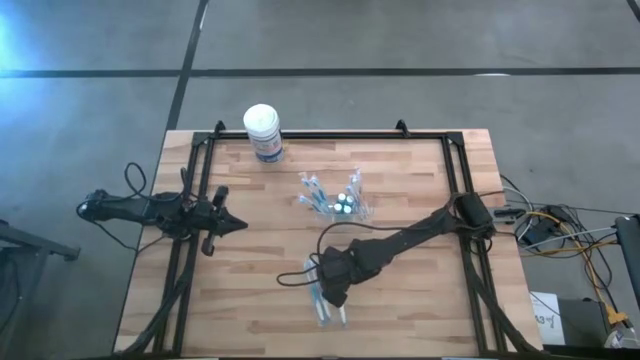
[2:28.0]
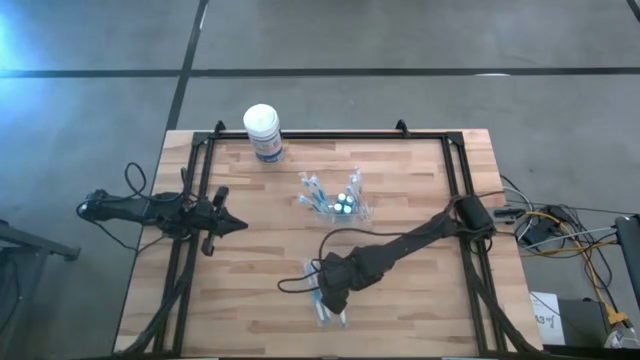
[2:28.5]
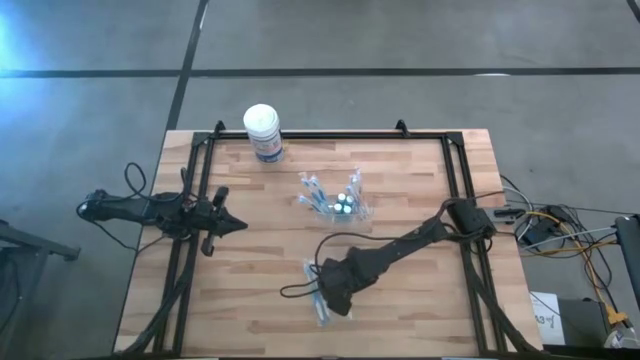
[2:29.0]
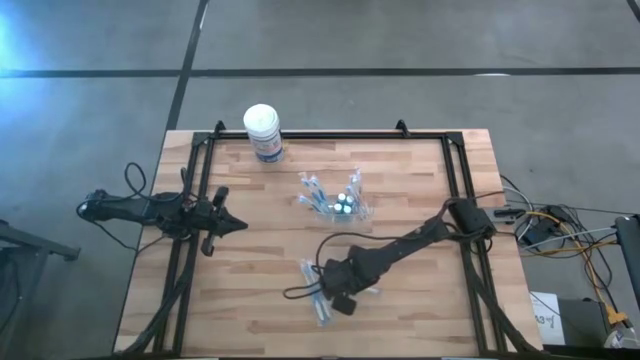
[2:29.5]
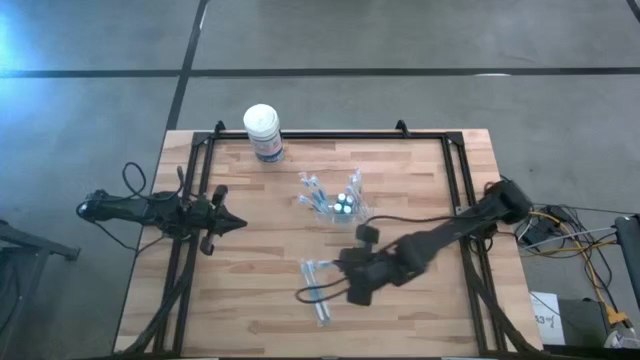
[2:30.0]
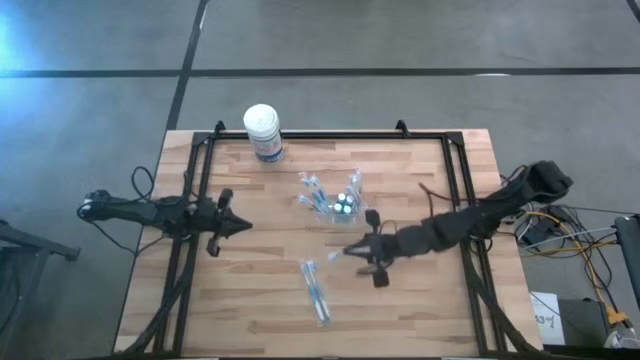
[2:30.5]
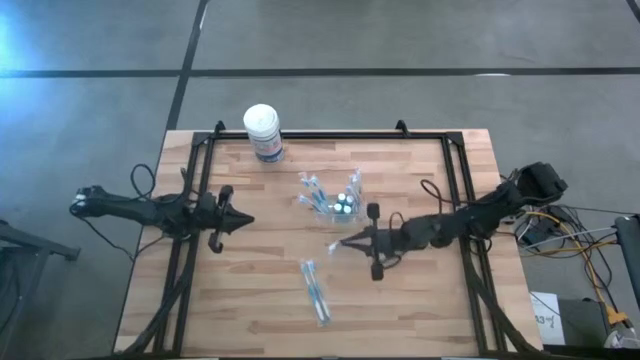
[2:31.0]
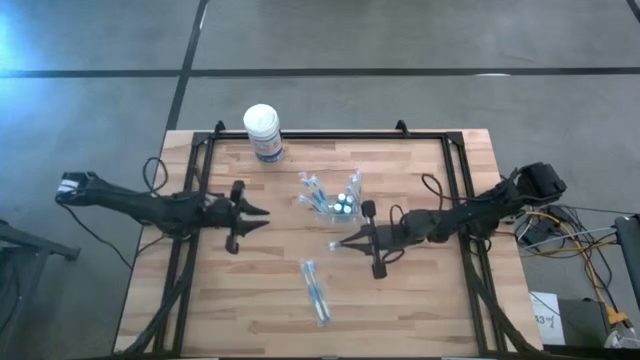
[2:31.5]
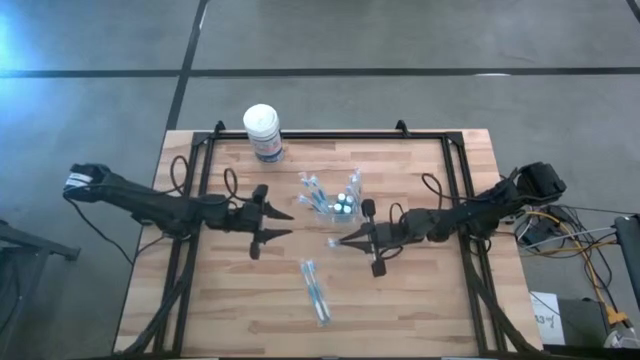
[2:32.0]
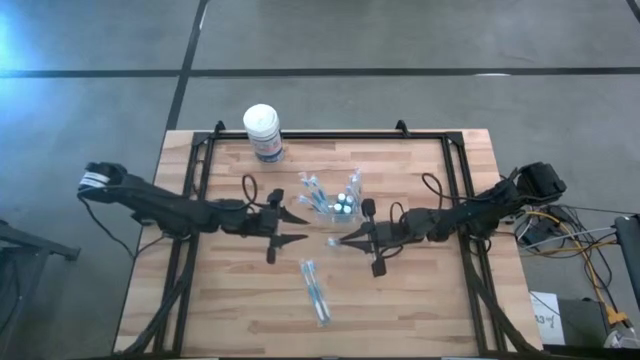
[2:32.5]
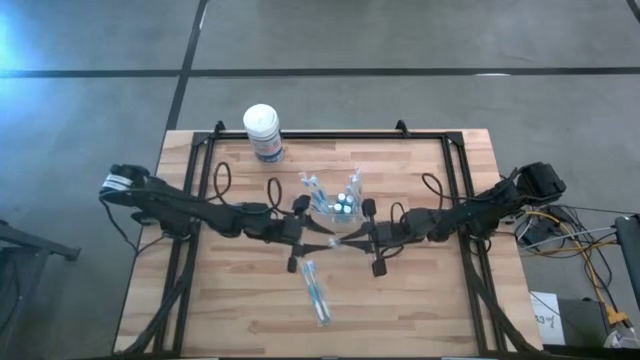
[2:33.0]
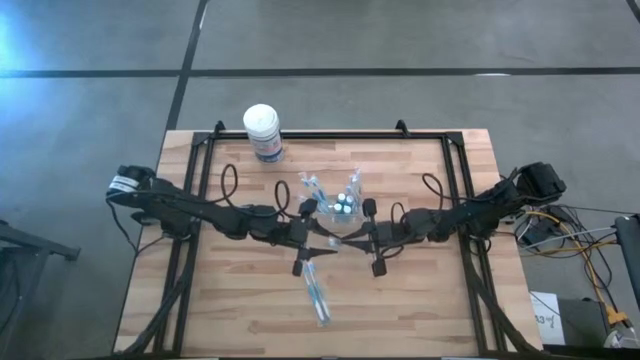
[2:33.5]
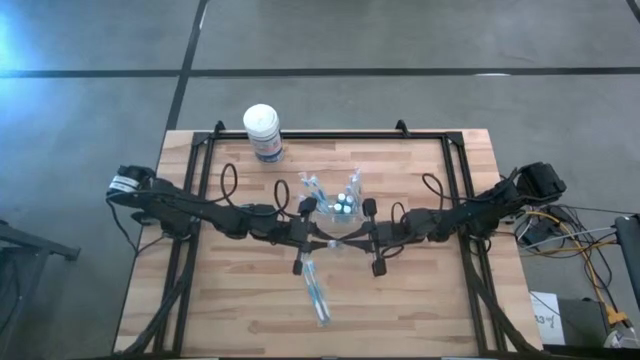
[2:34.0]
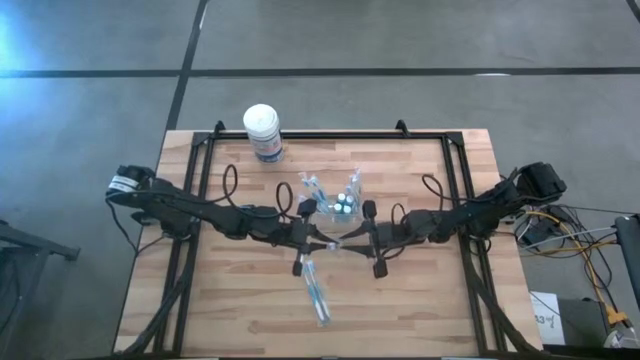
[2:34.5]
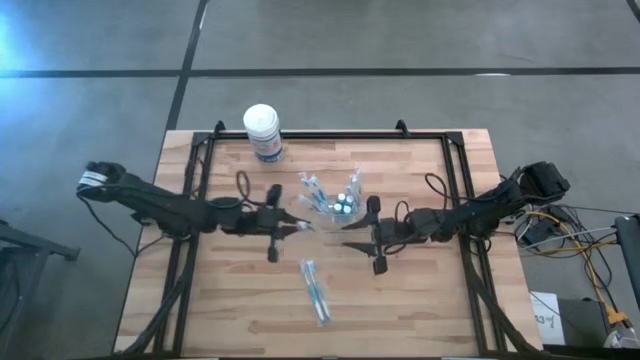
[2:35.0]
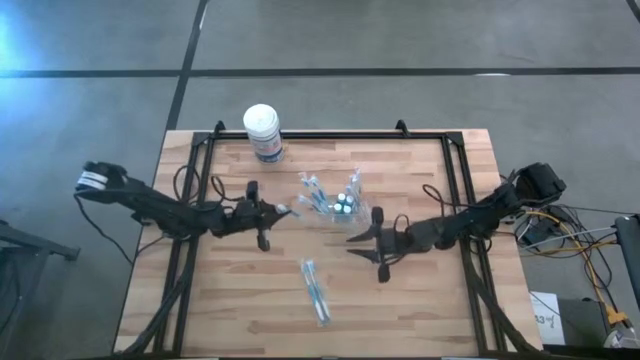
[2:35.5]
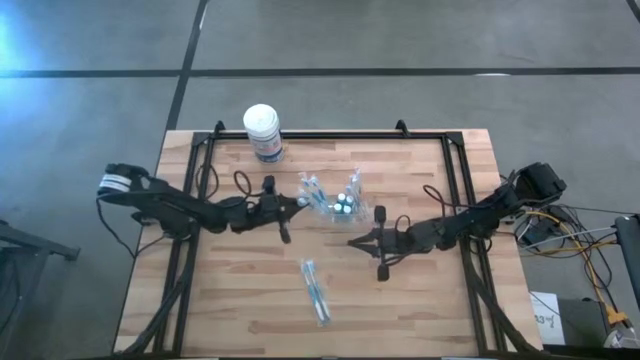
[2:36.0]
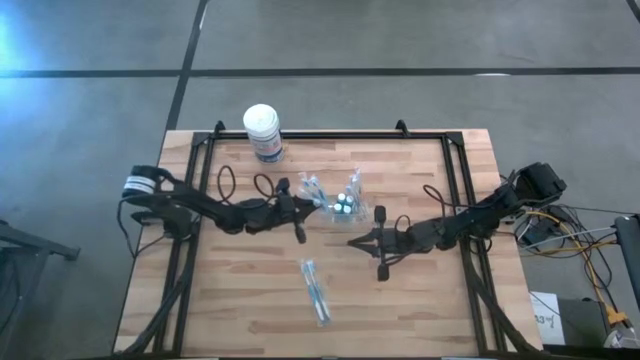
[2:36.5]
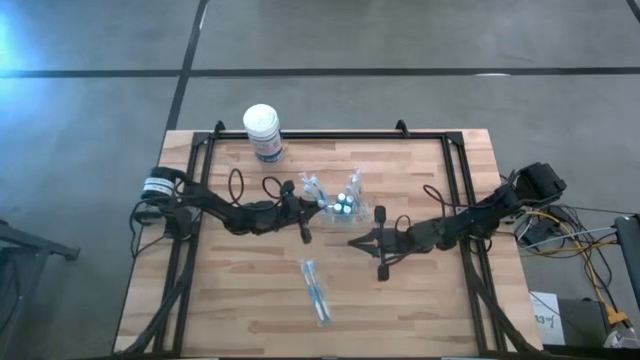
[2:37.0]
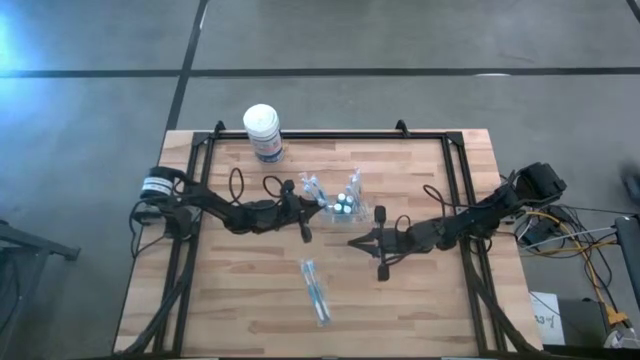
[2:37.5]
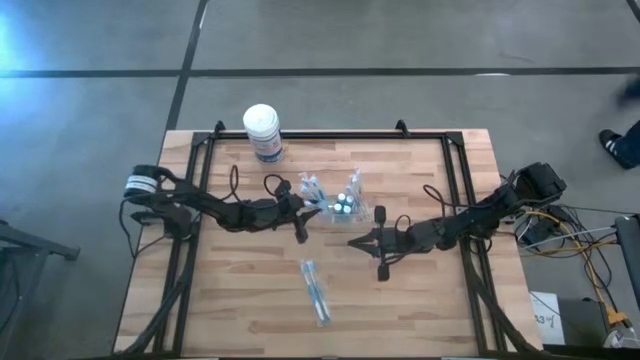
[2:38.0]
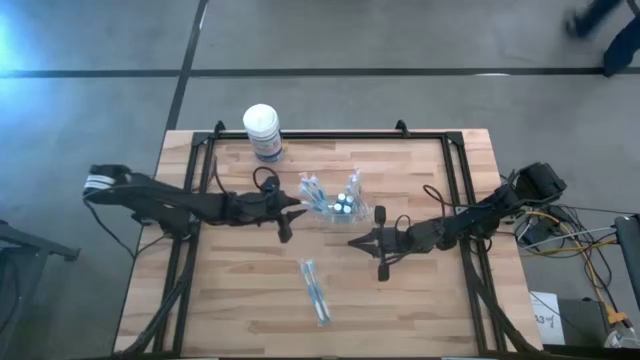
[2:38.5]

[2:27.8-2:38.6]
Task: Pick & Place toothbrushing station
Put the blue toothbrush into the transparent organizer

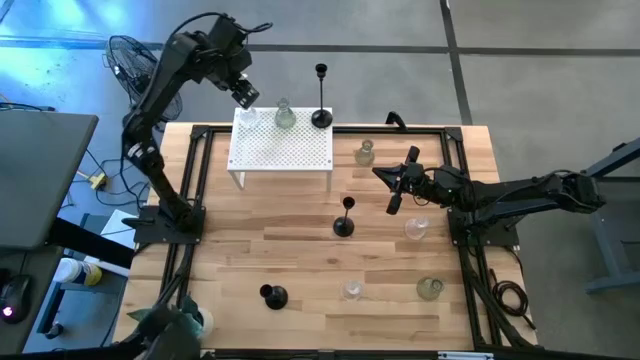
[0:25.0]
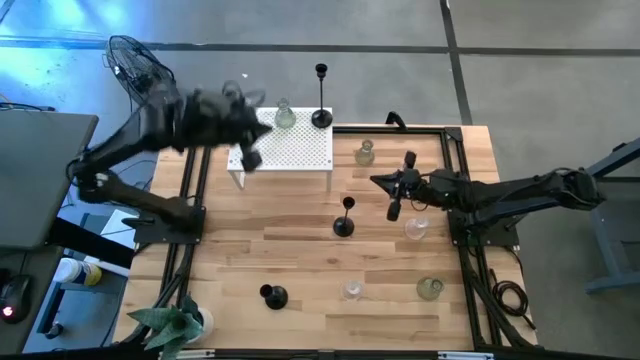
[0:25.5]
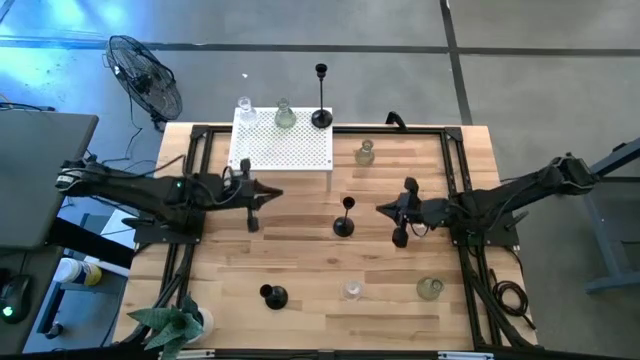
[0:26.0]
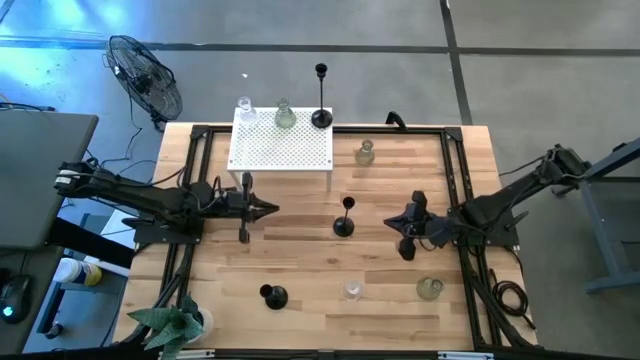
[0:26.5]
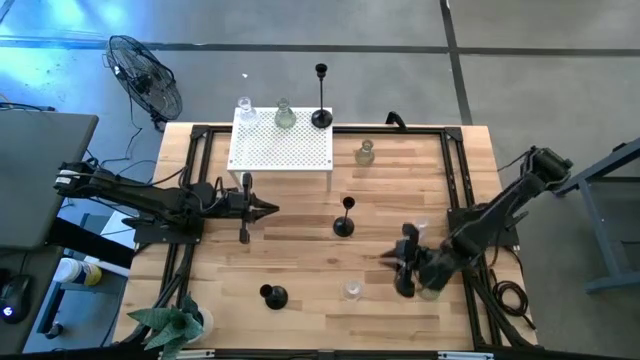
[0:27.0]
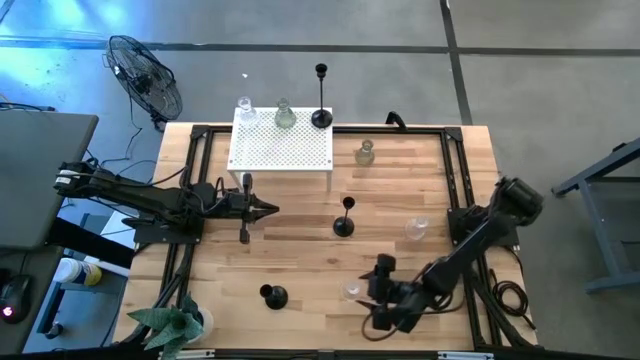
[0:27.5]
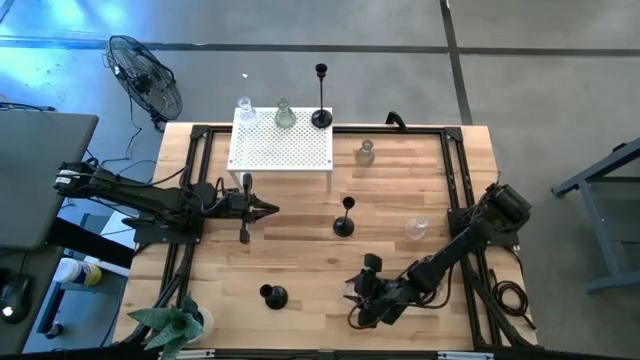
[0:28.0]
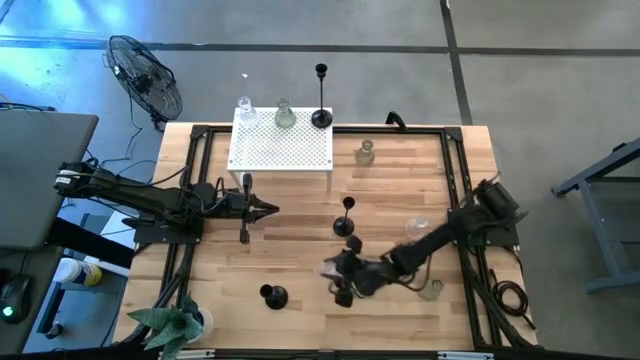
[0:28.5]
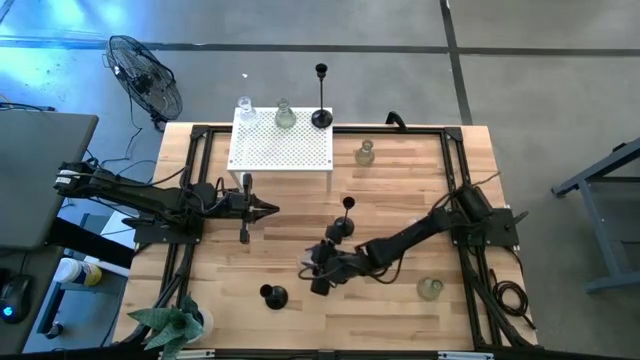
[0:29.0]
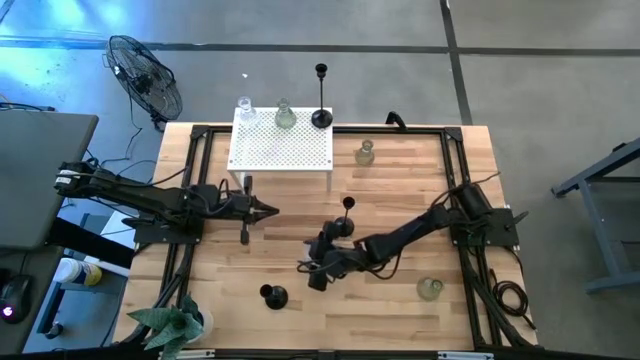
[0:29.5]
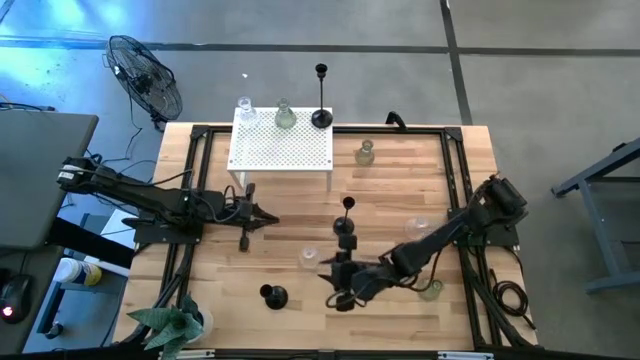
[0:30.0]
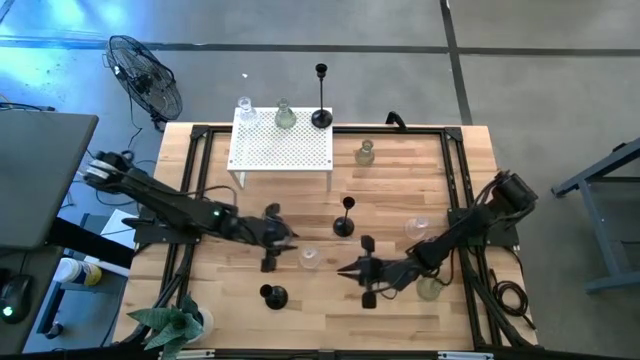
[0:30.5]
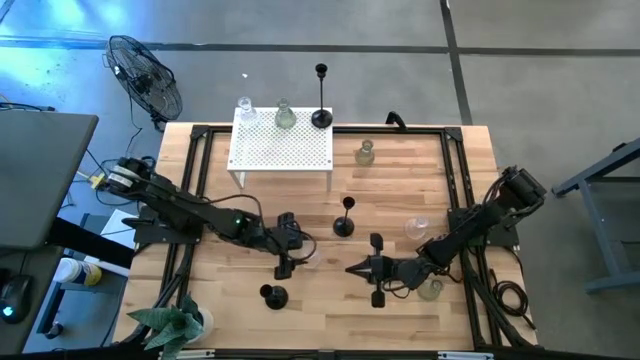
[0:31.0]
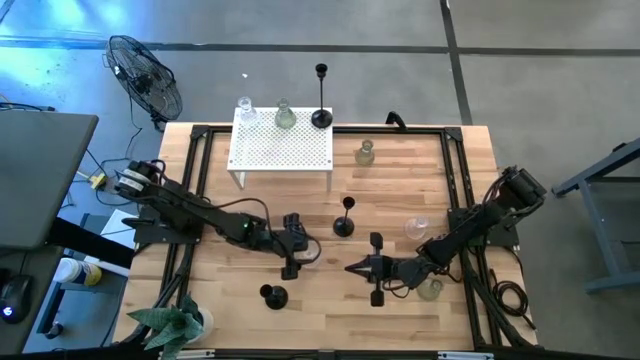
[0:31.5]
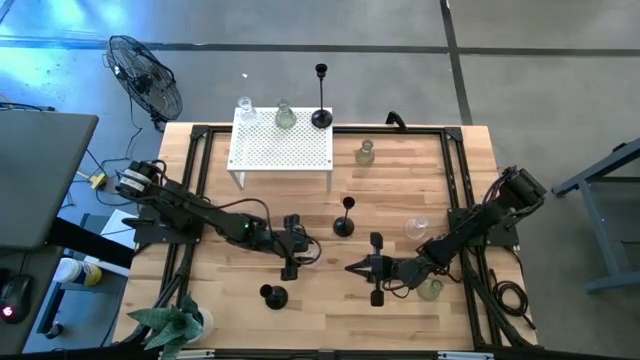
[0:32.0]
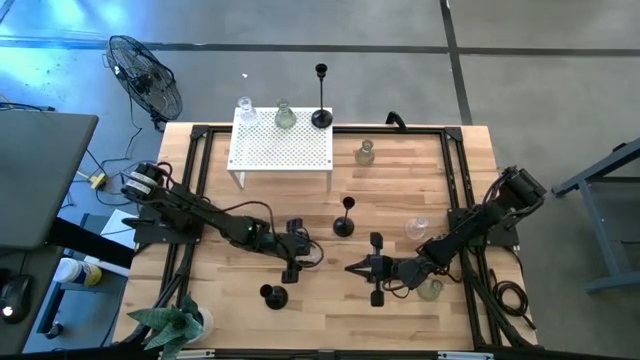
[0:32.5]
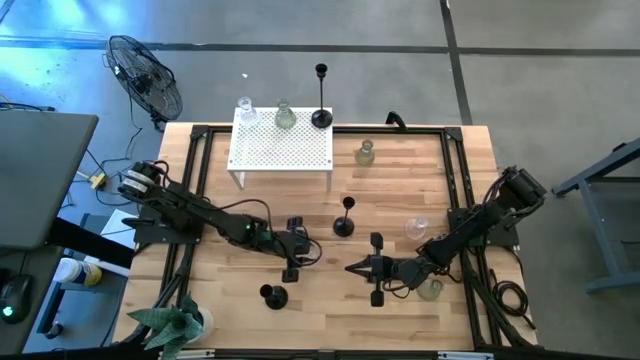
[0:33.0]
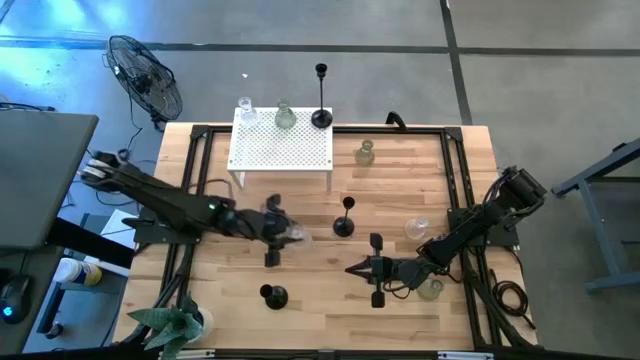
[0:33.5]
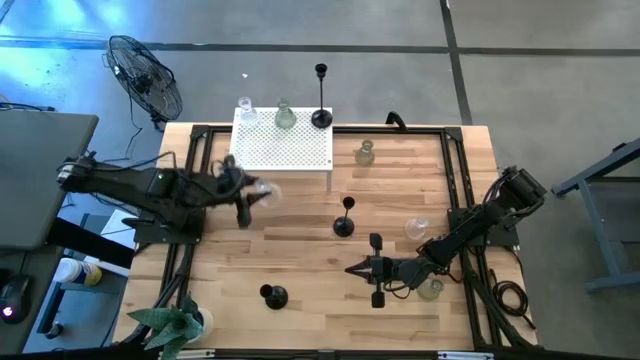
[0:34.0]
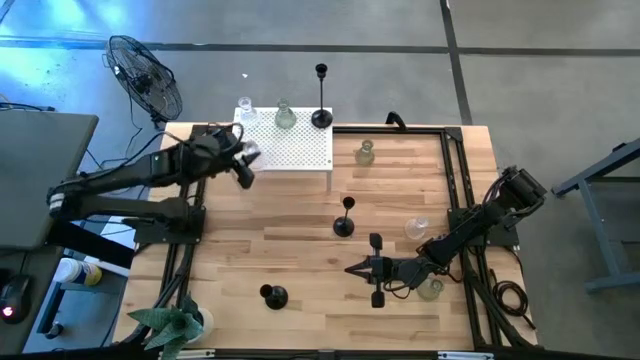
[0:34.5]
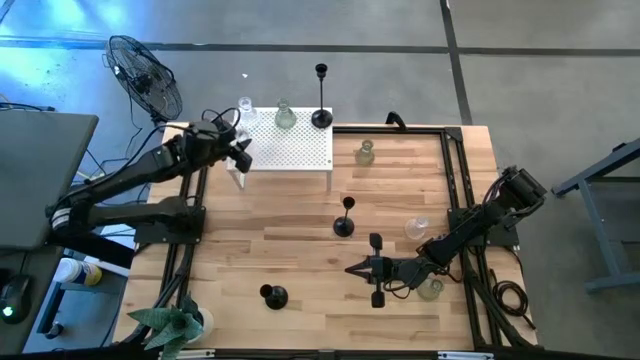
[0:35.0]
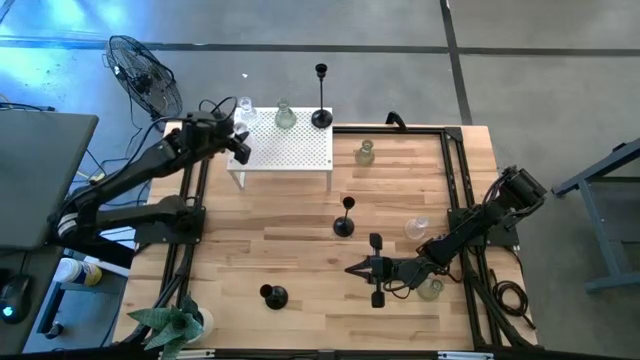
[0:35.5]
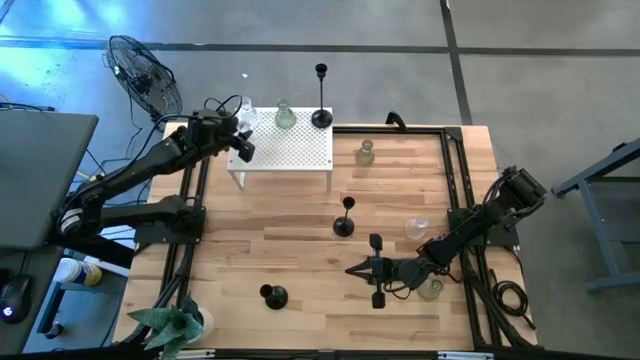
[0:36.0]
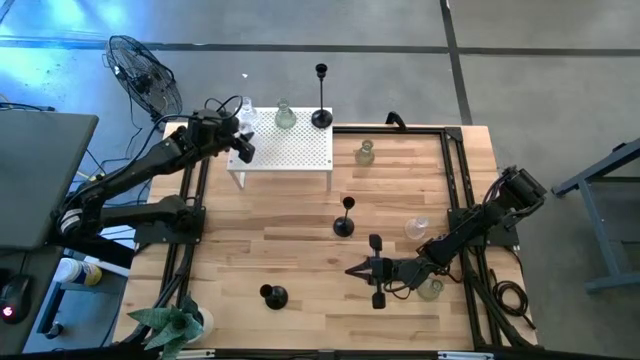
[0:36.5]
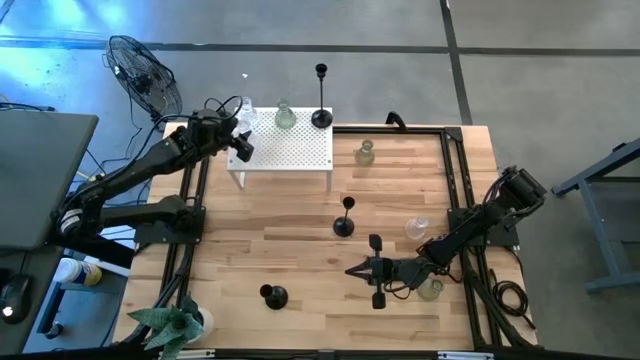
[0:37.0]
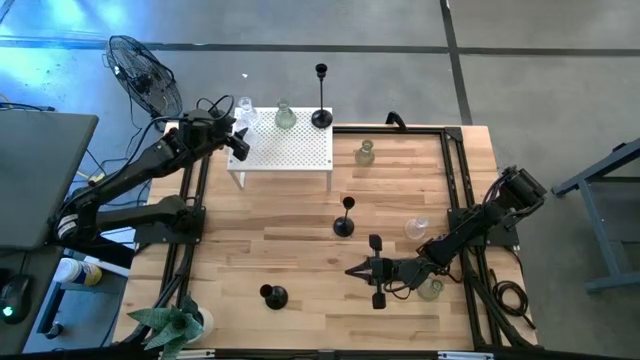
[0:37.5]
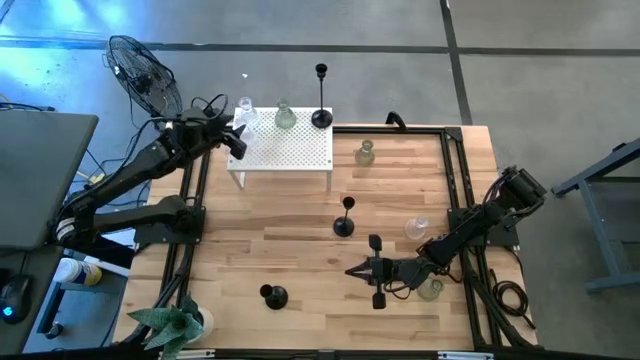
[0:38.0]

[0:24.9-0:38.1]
Task: Pick & Place candle stick holders
Align the bottom transparent candle holder with the other transparent candle holder on the shelf
